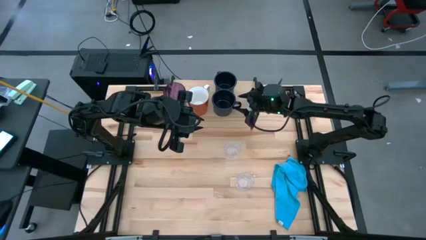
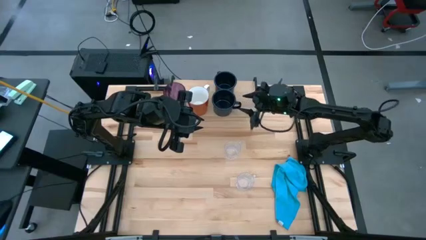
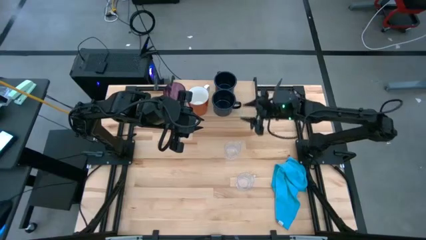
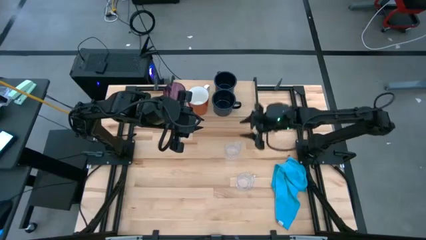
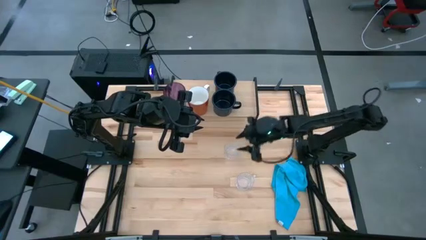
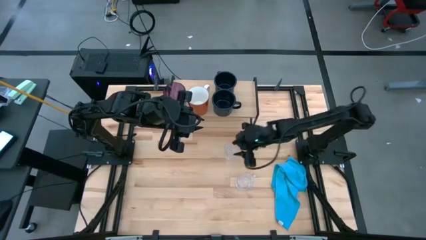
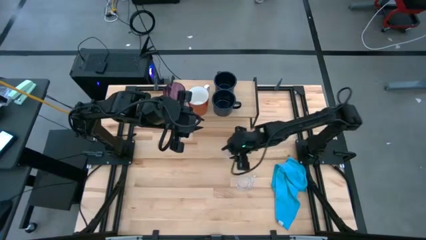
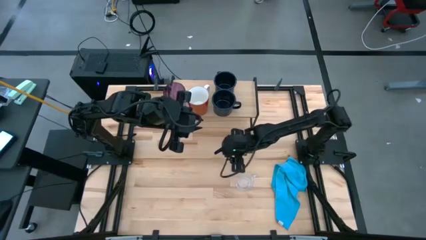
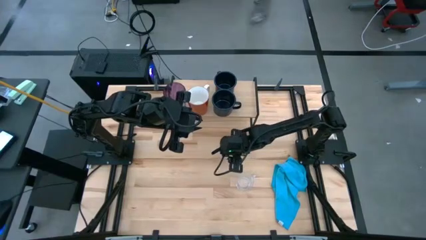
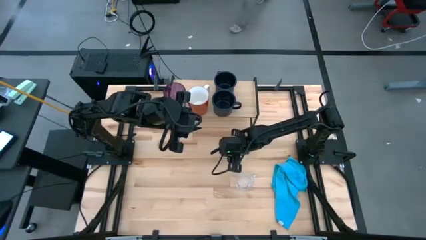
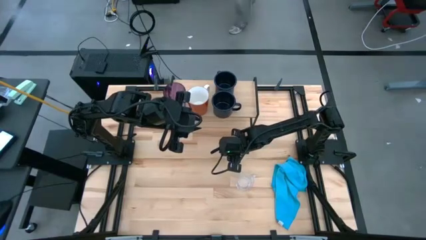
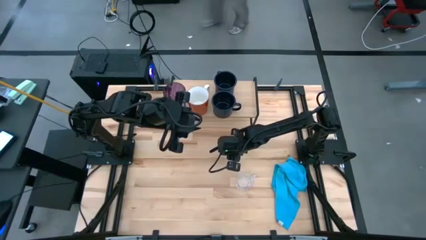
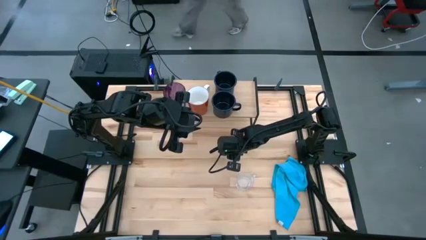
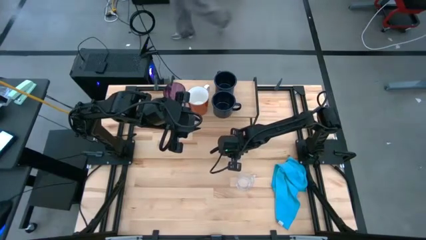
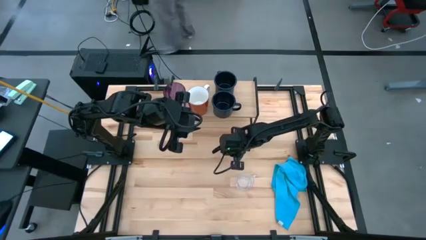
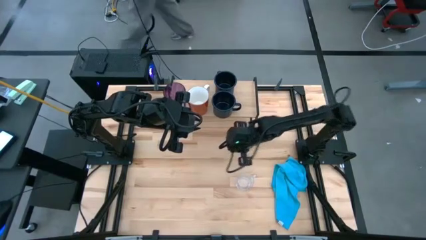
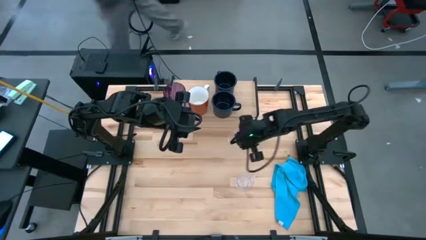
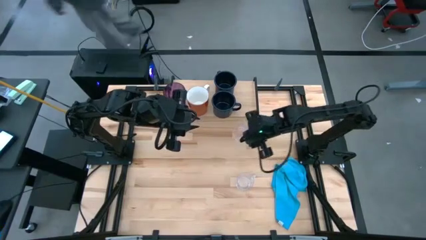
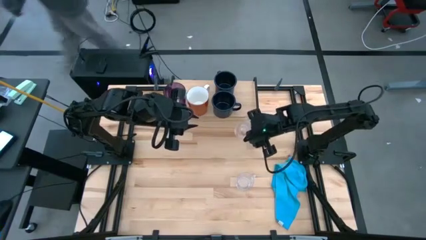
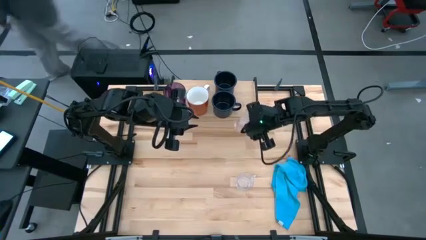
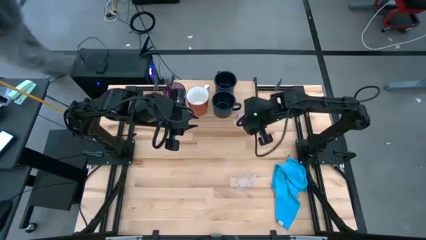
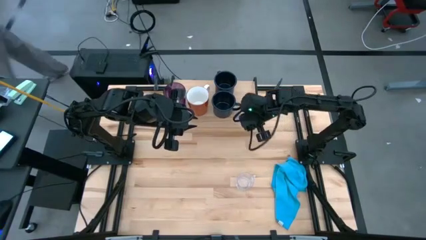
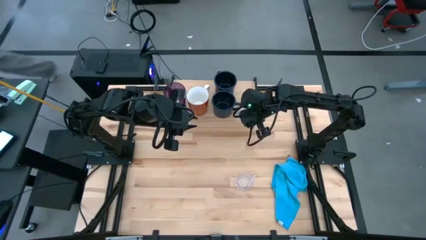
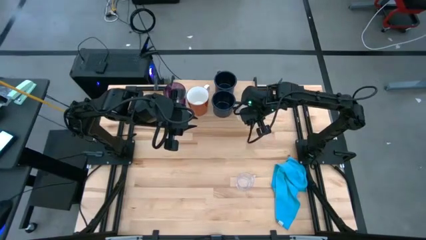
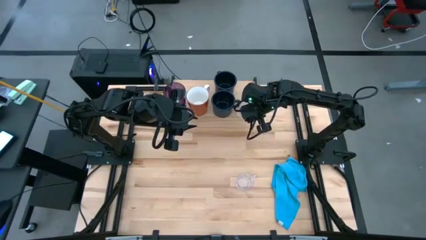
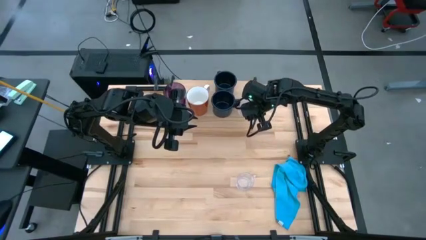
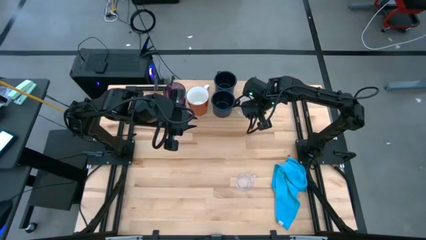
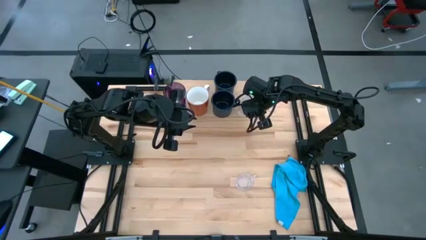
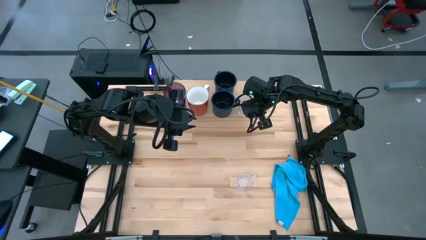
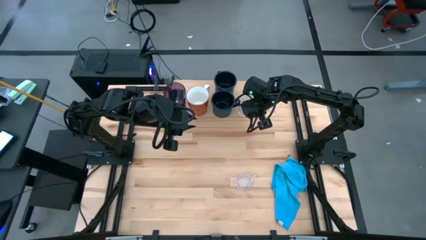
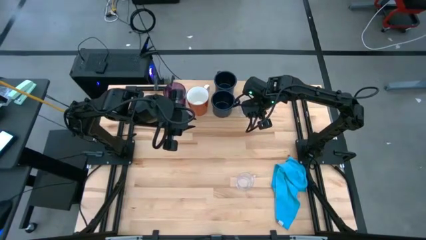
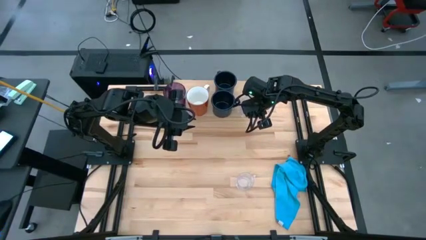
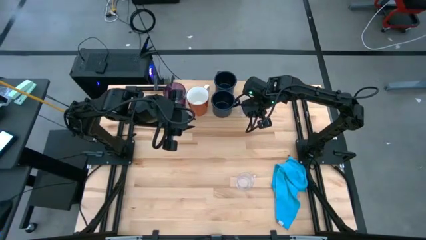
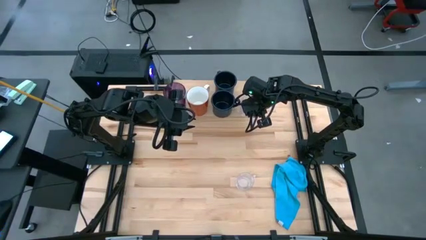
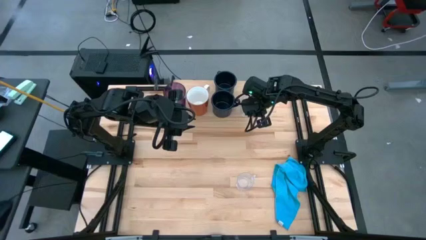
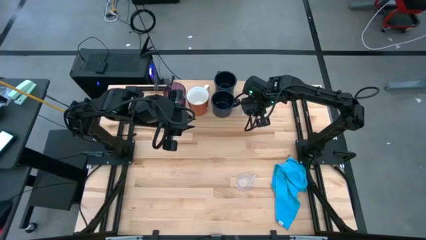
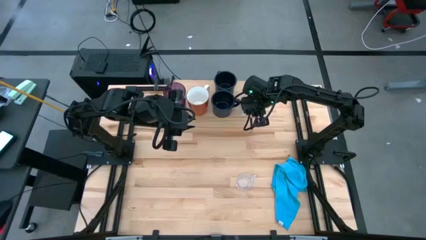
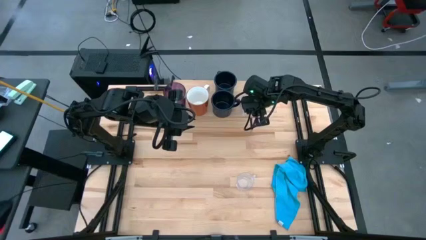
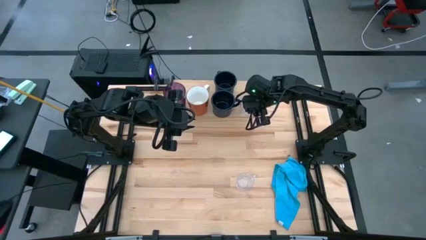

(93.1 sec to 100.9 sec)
Task: Stack small to large cups/mugs on shelf
Put the top transparent mug on the shelf

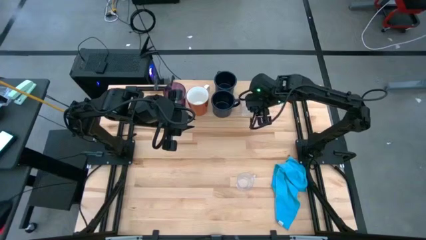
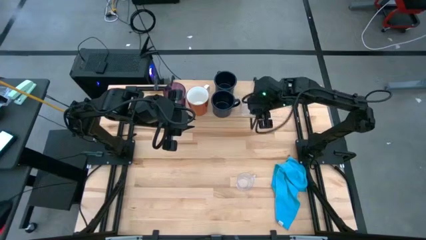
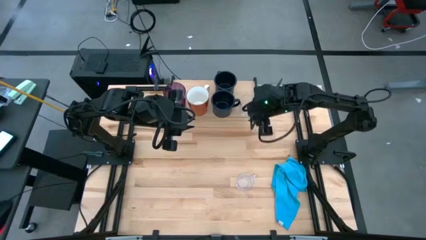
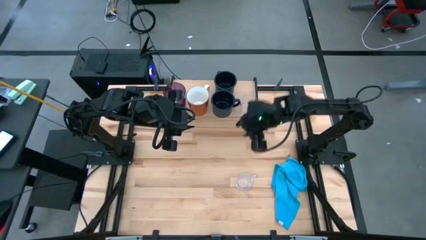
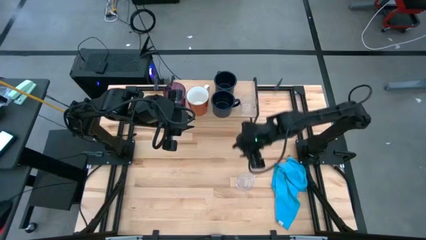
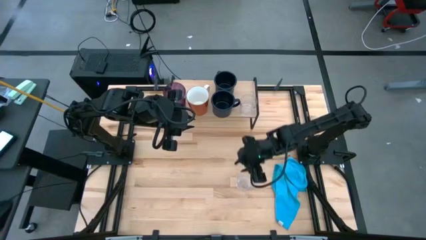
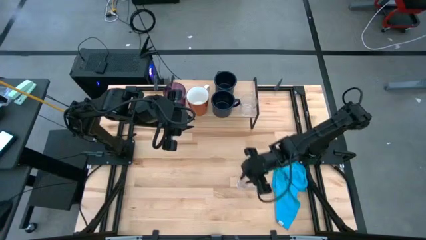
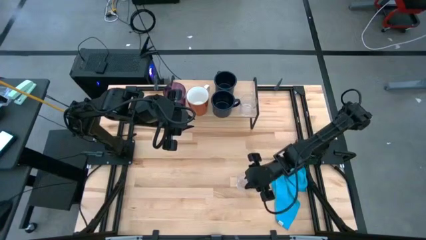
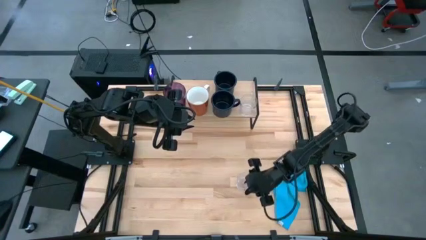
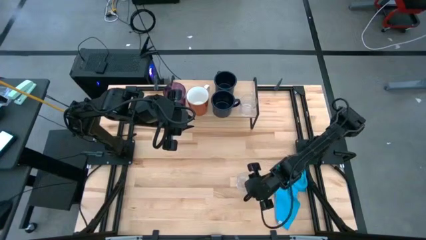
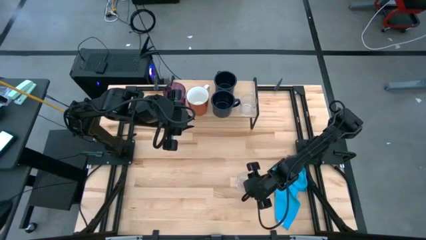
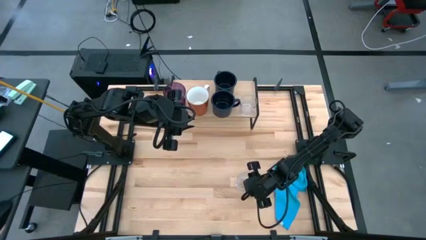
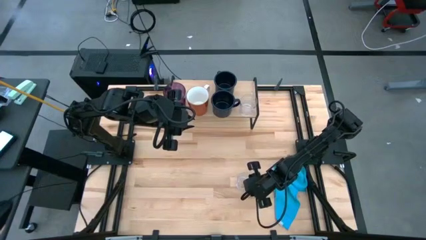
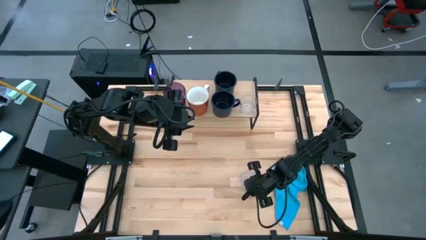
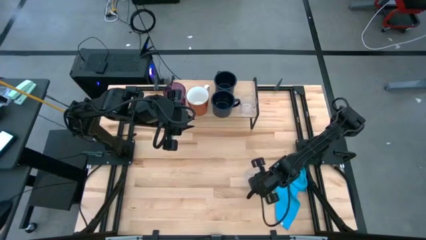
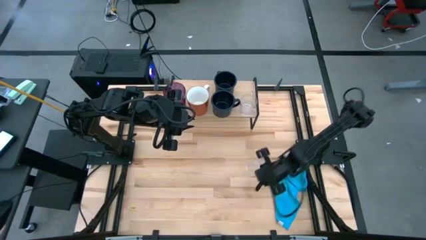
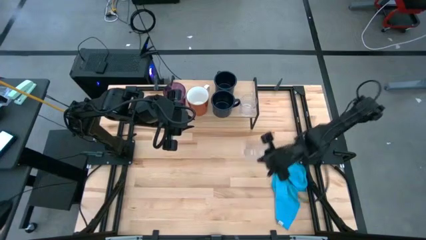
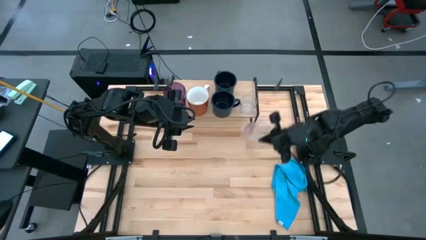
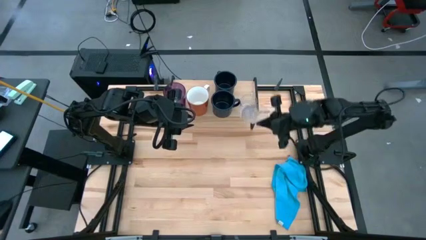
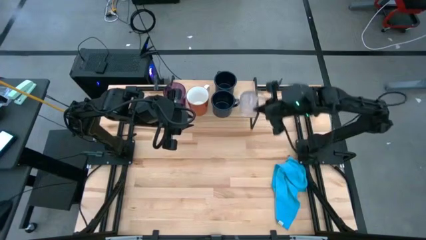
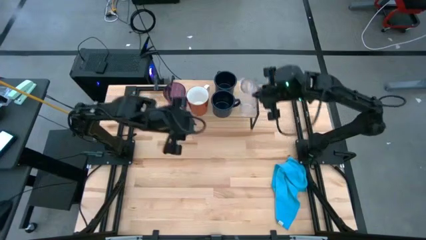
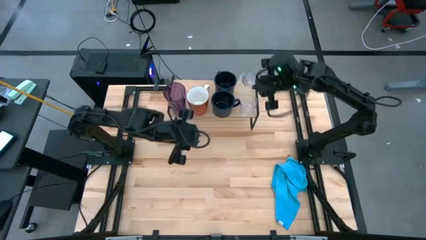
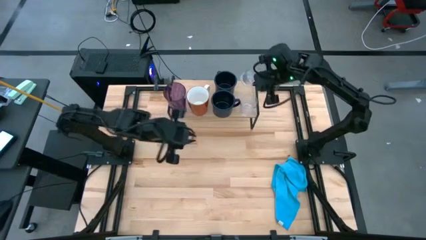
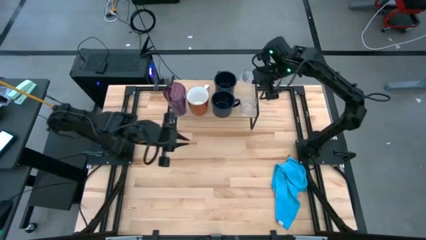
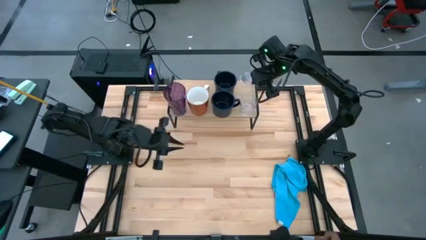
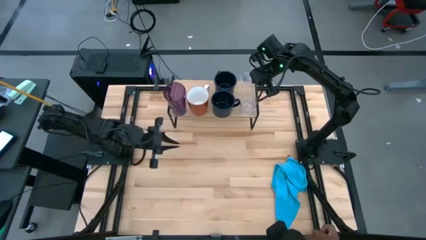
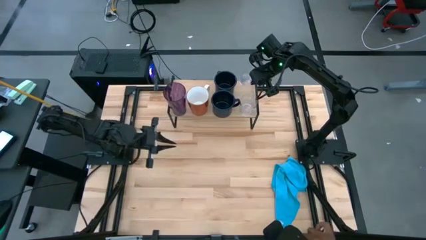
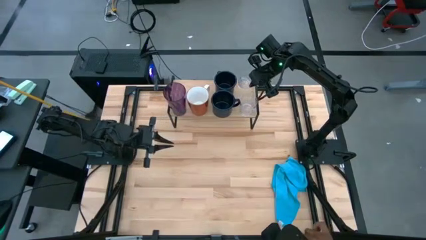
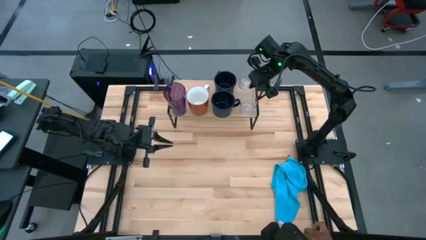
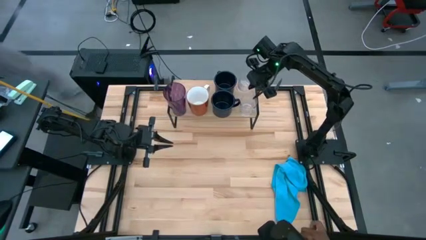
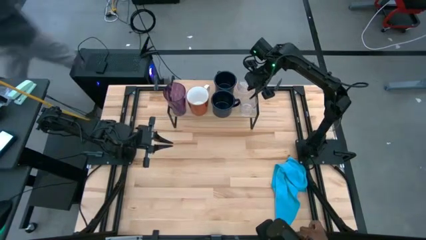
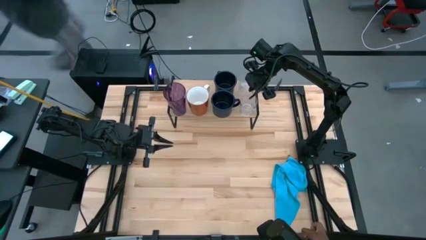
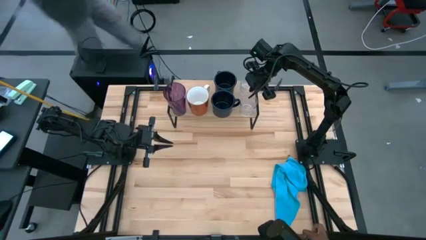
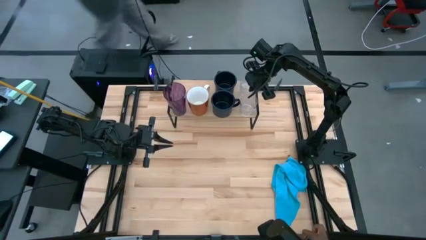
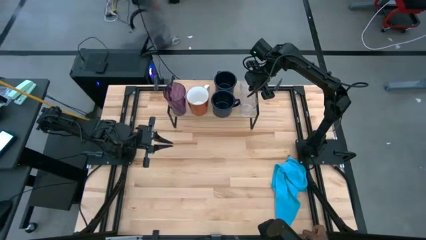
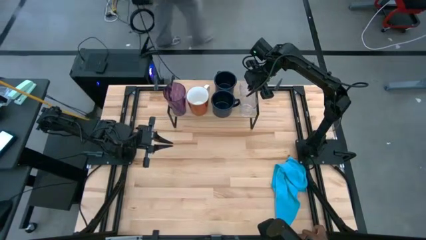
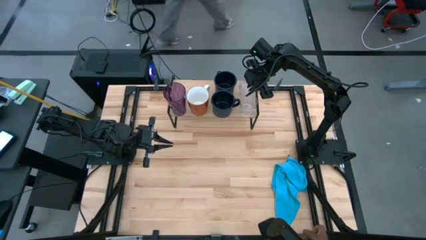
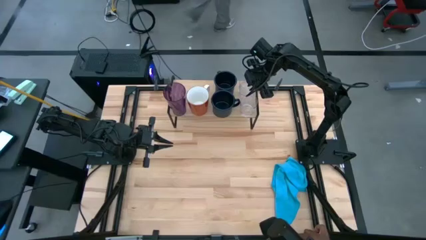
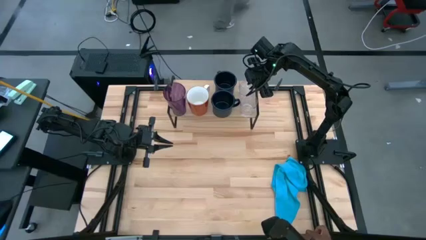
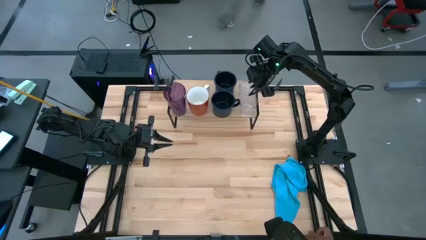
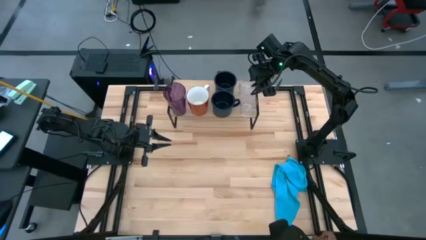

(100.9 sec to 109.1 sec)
Put the transparent mug on the shelf aligned with the other transparent mug
